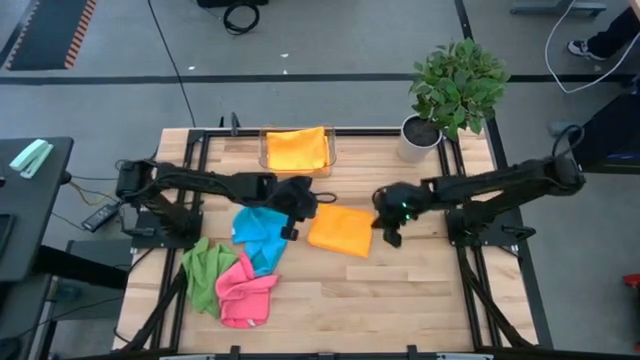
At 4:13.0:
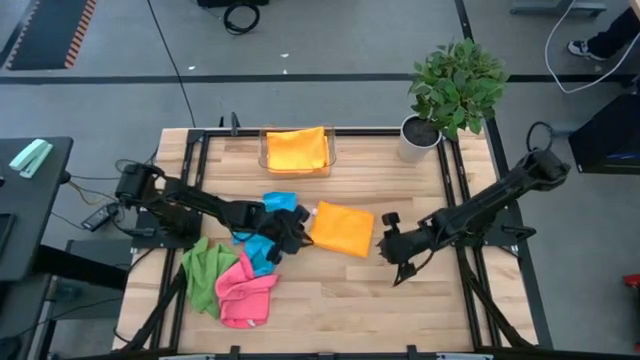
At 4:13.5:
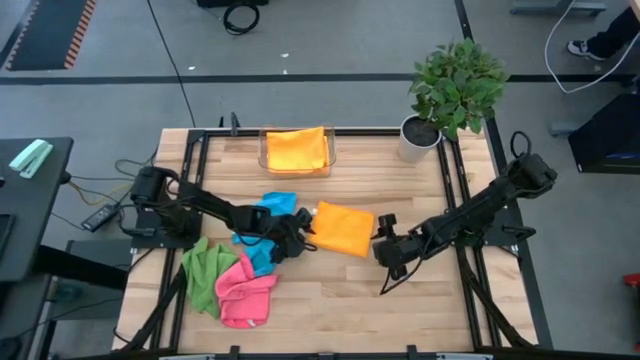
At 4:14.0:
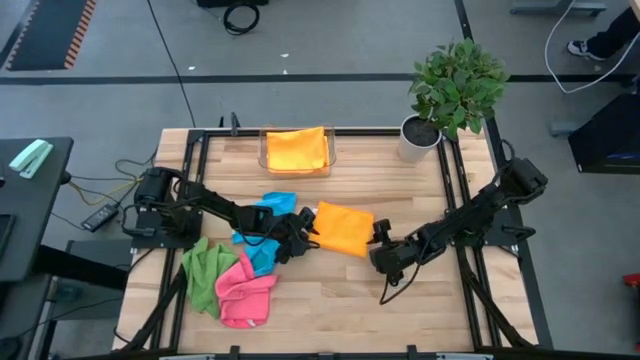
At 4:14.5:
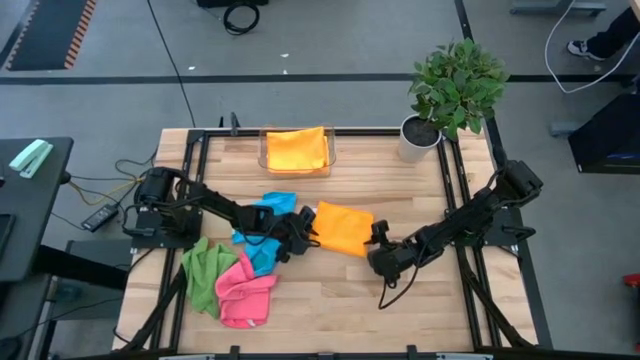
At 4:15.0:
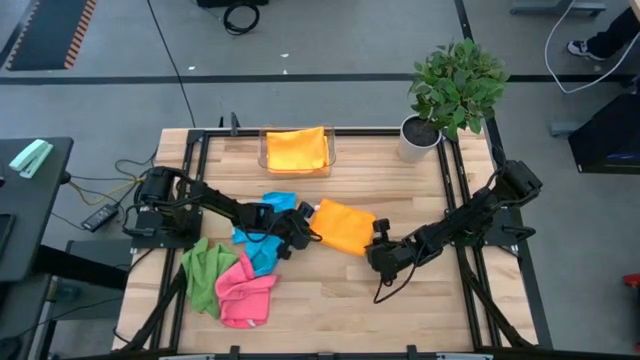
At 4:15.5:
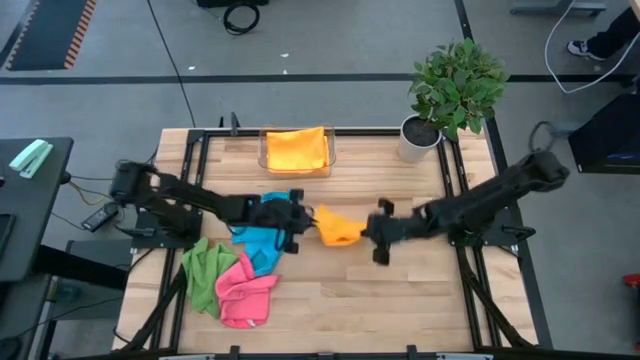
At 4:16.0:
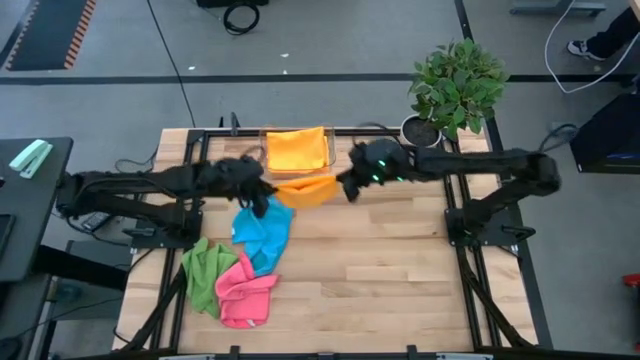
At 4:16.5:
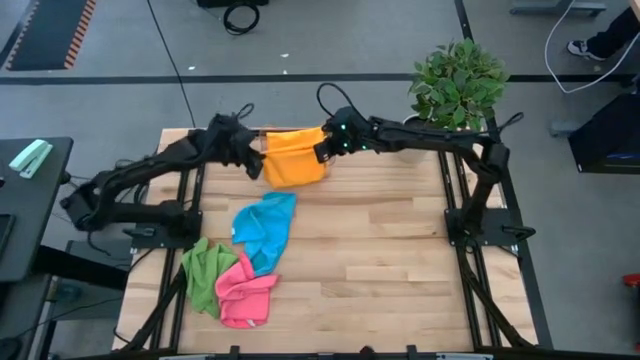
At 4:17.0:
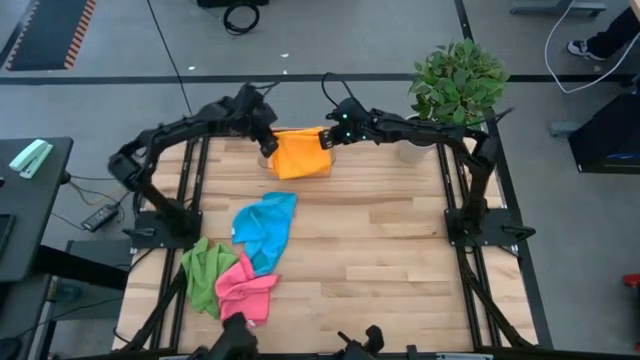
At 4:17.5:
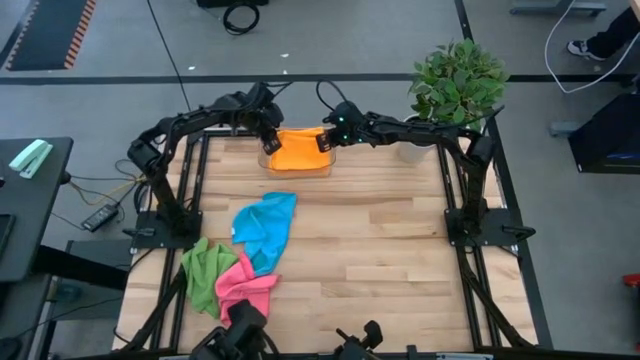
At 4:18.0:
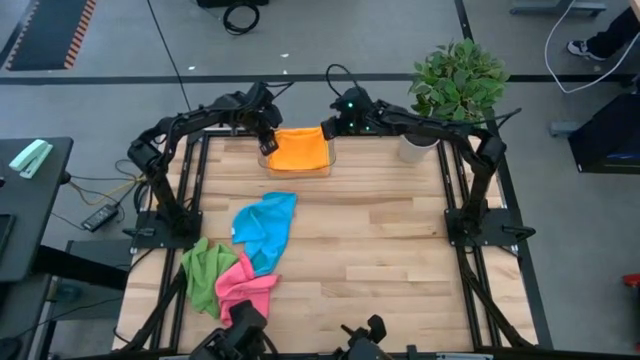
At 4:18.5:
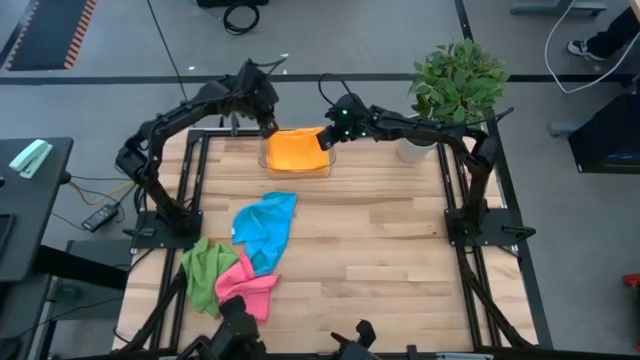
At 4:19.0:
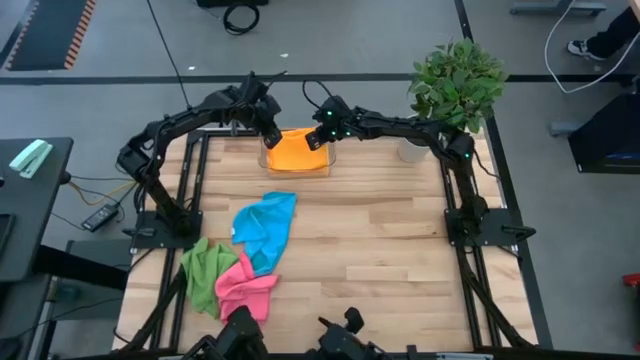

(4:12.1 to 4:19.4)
Task: Fold microfiber towels
Put the orange microfiber towel into the transparent bin

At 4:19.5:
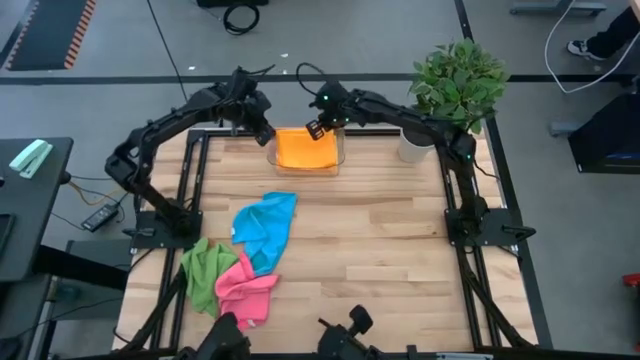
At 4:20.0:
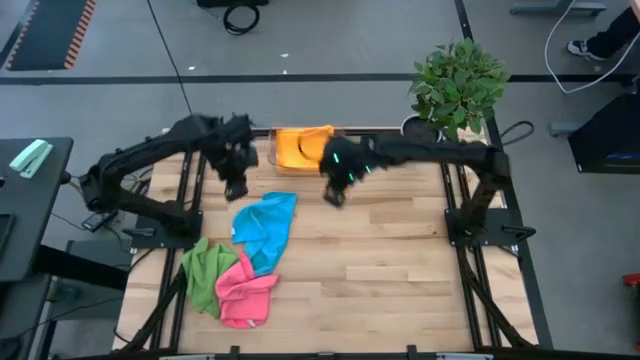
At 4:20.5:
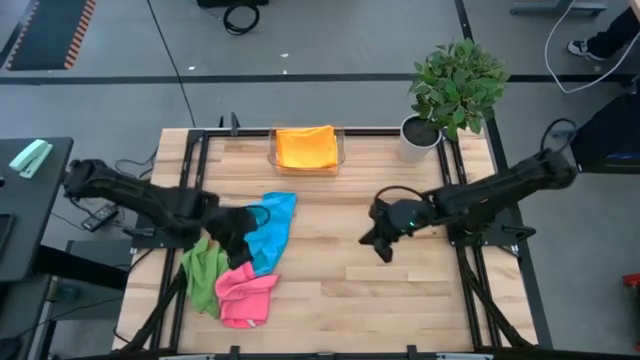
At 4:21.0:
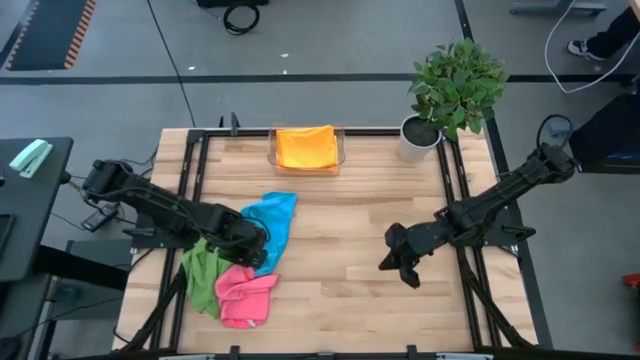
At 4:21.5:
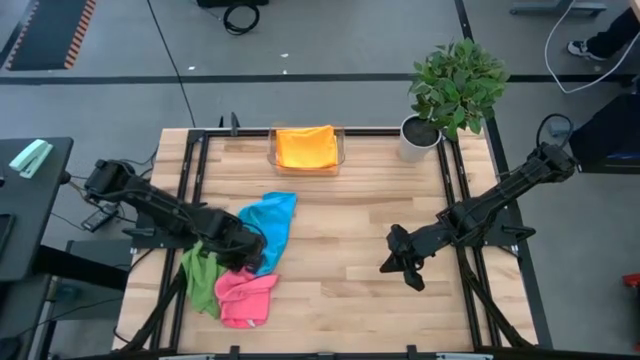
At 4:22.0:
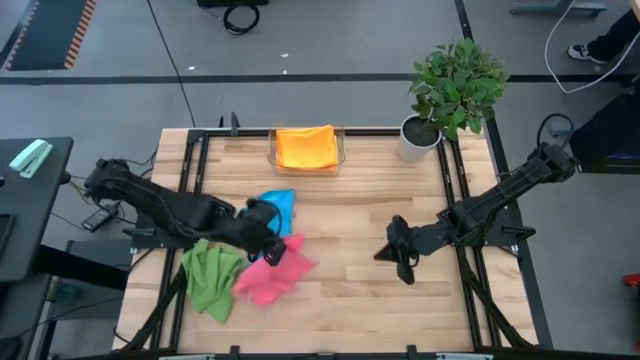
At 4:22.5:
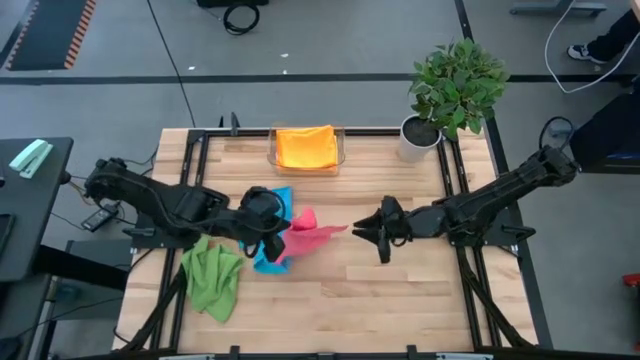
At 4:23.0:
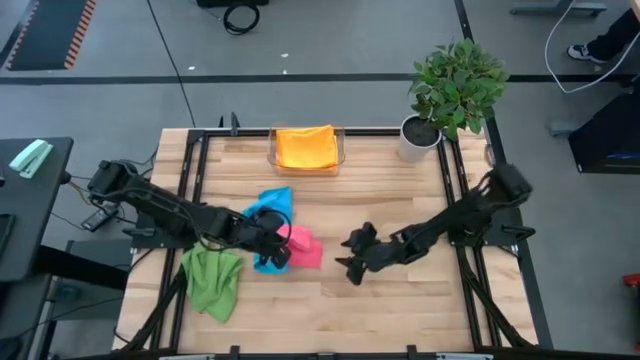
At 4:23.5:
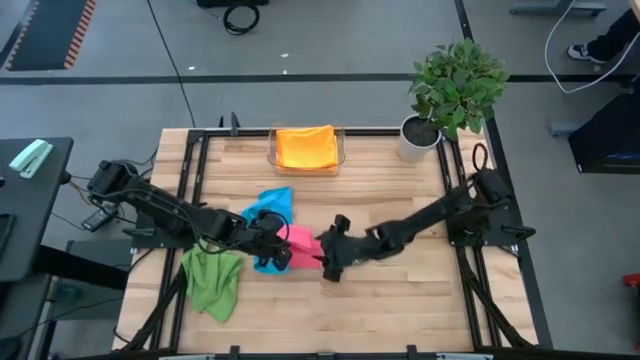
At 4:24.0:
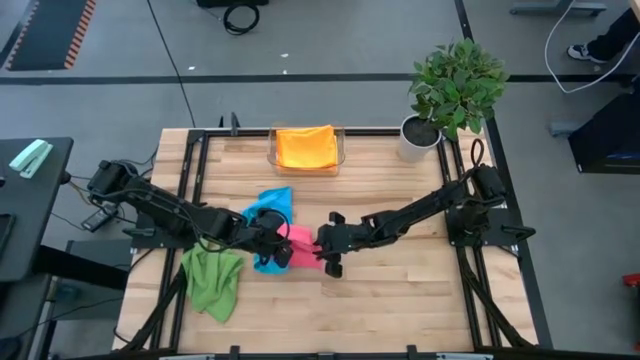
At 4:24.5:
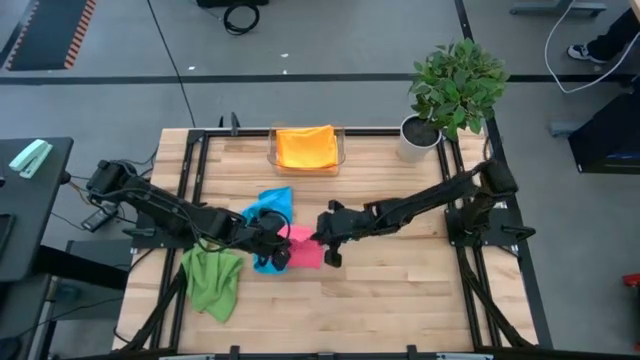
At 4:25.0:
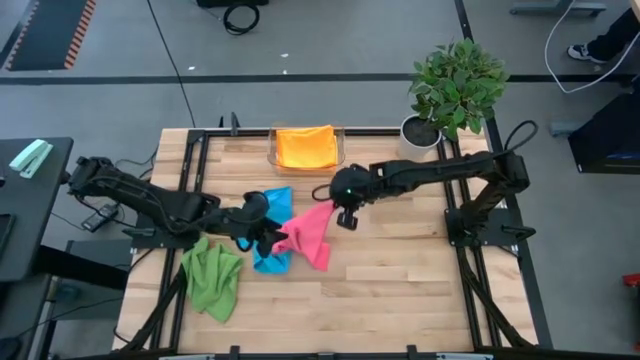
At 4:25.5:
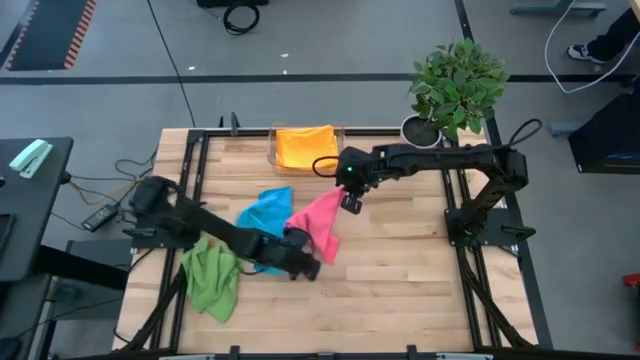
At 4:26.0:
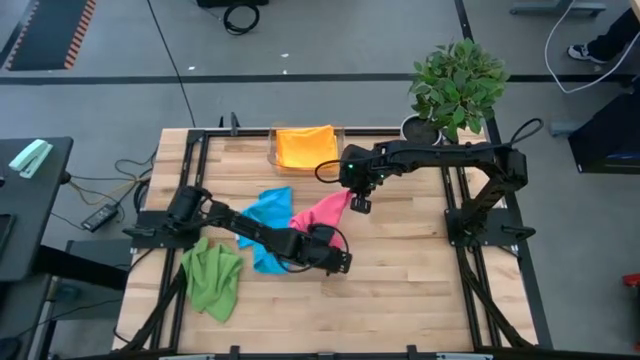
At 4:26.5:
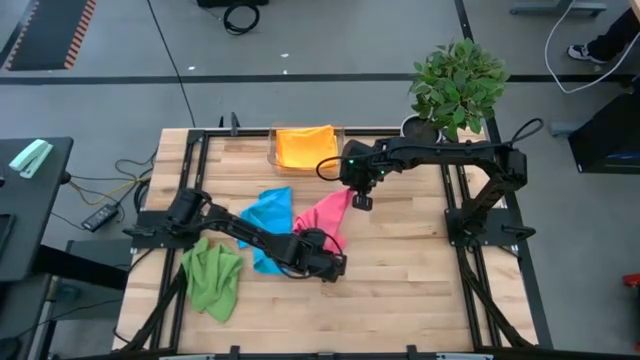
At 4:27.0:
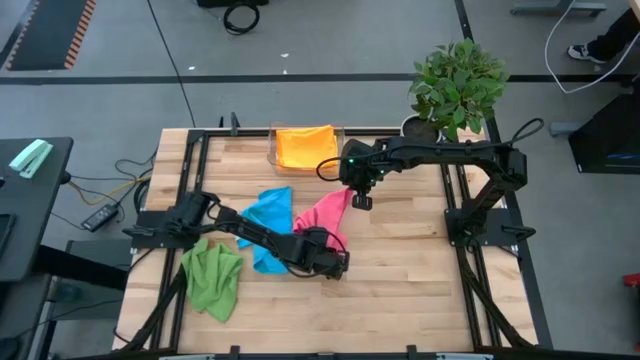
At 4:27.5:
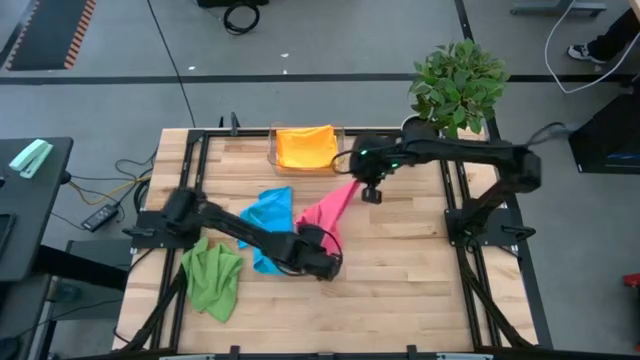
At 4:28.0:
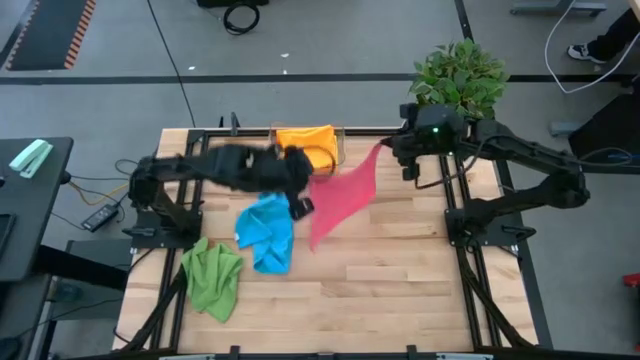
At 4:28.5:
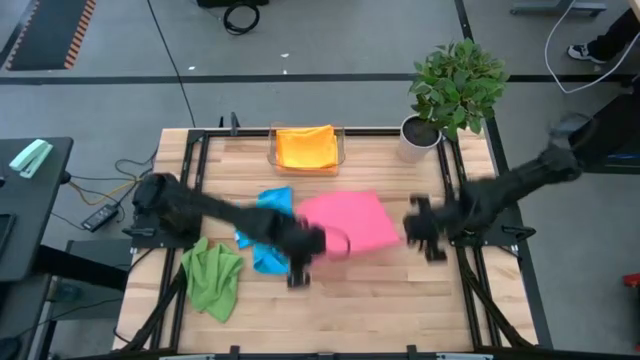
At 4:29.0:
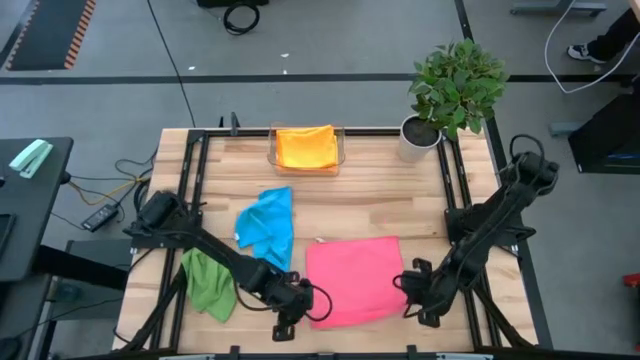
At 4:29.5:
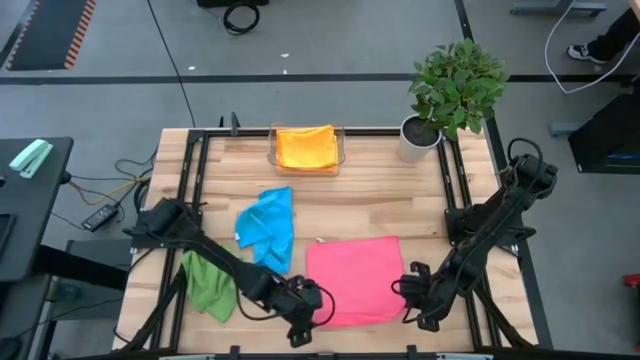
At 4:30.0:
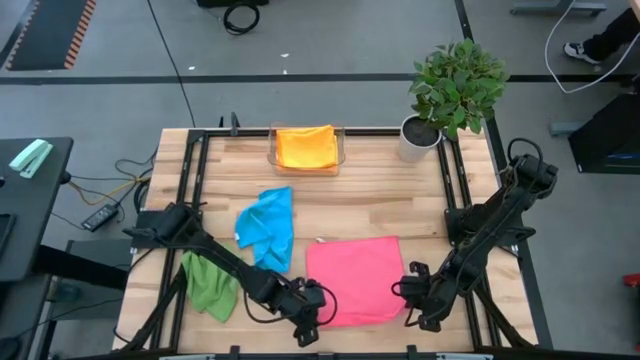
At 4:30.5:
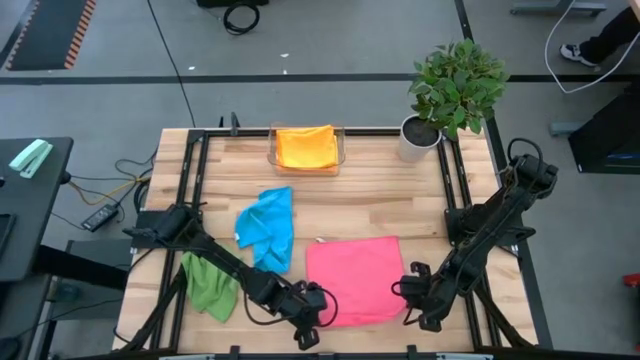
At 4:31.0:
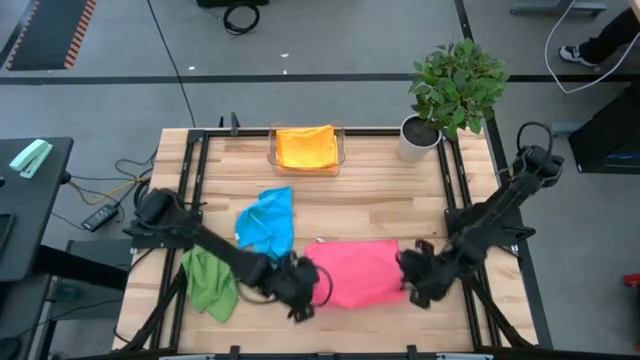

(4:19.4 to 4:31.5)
Fold the pink microfiber towel

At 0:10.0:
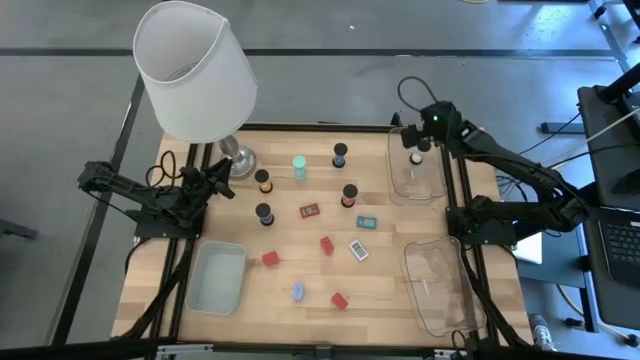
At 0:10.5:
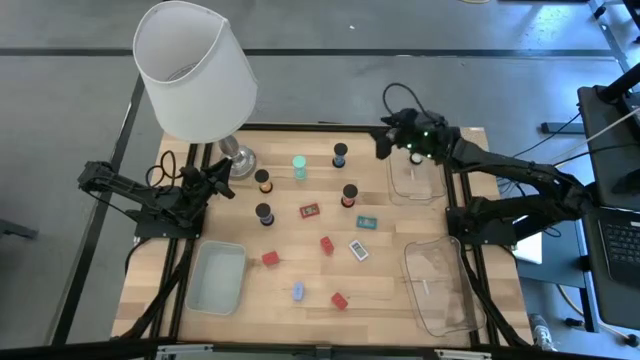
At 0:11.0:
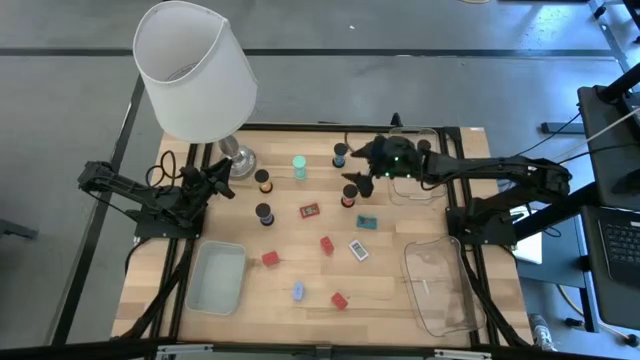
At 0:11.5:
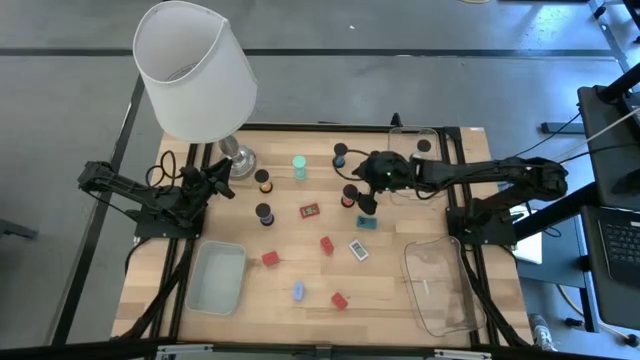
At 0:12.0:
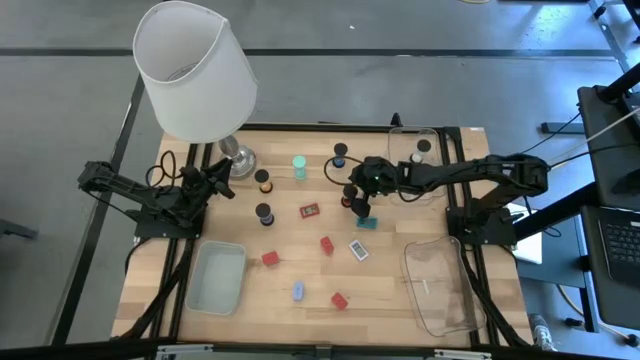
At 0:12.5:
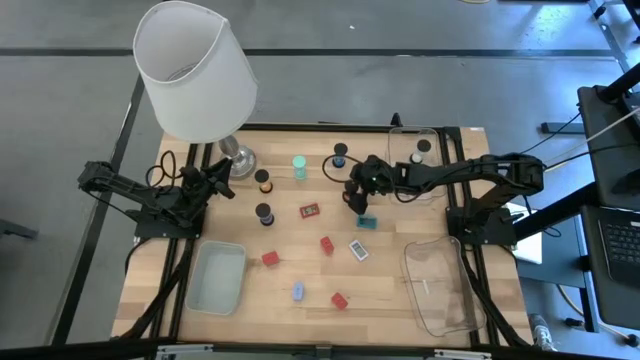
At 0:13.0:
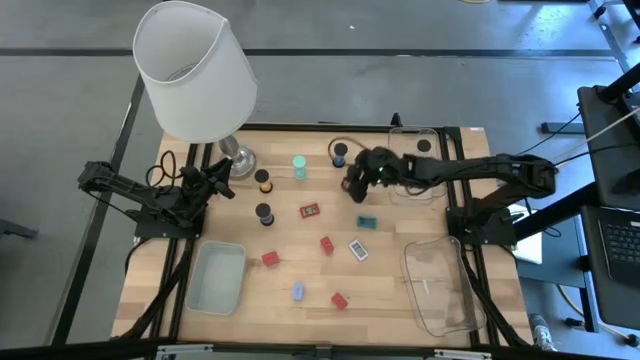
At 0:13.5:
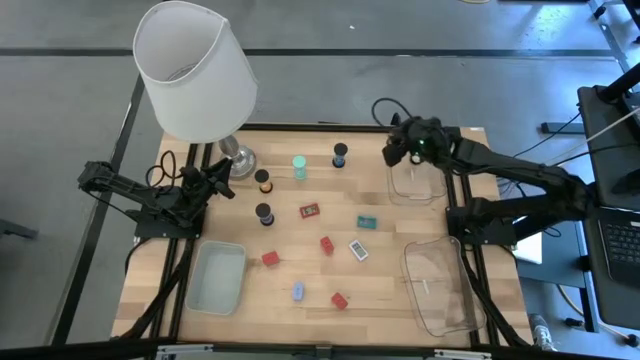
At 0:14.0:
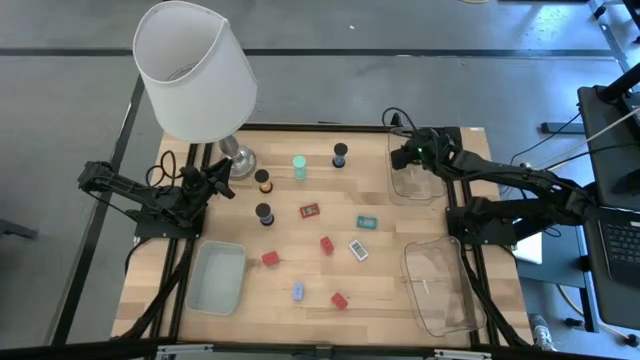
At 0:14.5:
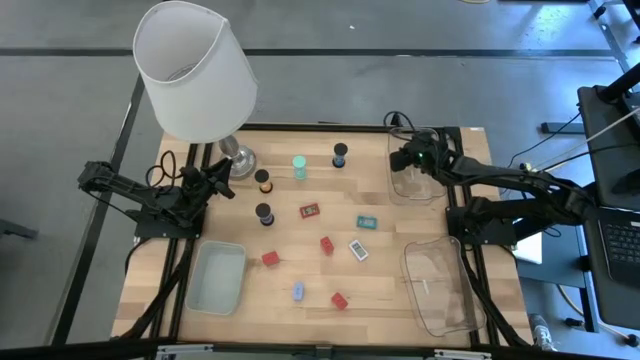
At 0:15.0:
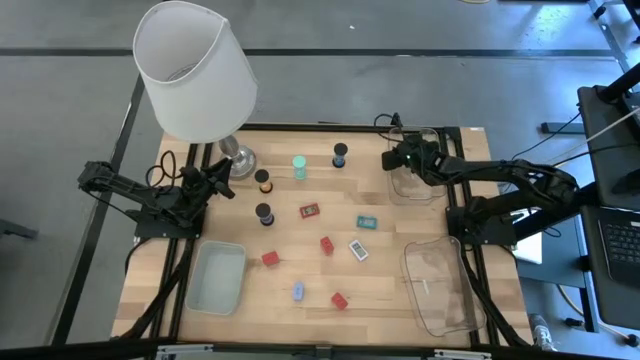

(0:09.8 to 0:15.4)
Task: Pick & Place Office items
Put the pink sand timer into the top transparent bin
